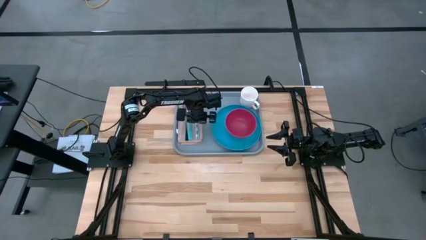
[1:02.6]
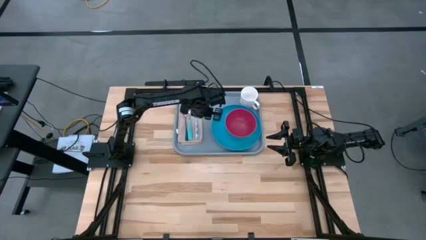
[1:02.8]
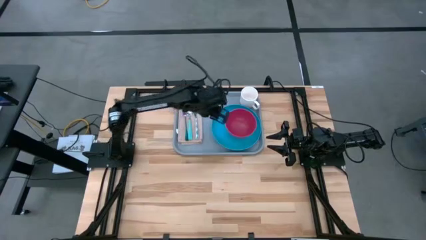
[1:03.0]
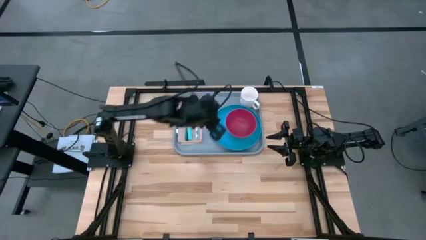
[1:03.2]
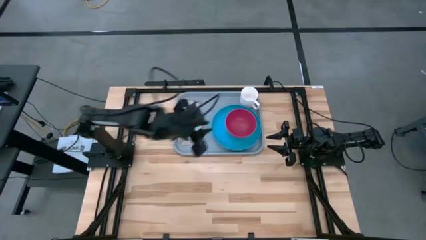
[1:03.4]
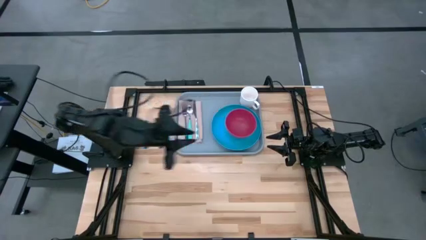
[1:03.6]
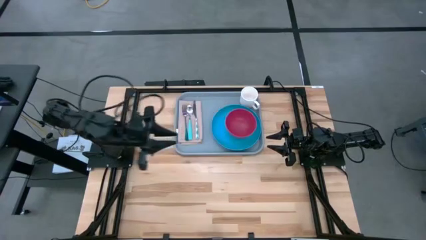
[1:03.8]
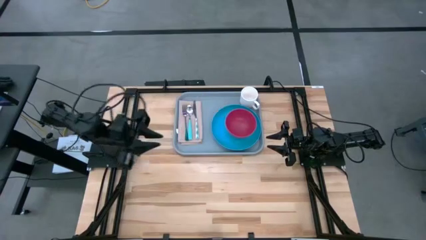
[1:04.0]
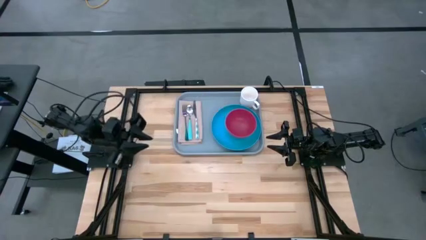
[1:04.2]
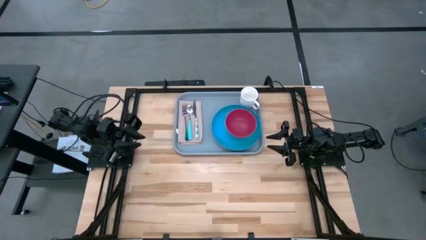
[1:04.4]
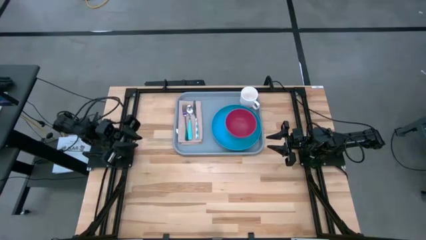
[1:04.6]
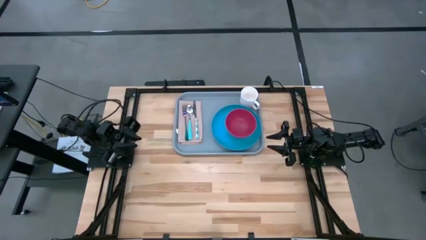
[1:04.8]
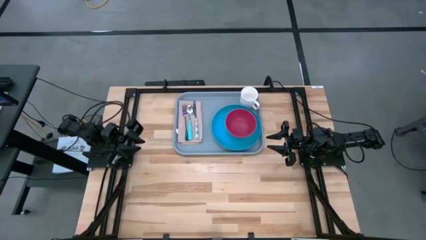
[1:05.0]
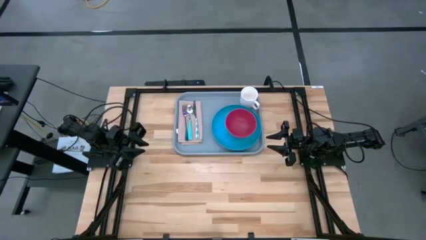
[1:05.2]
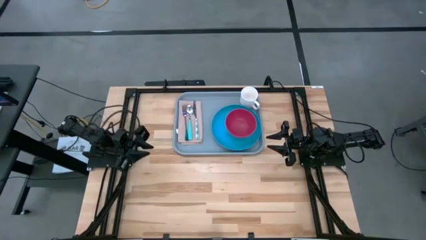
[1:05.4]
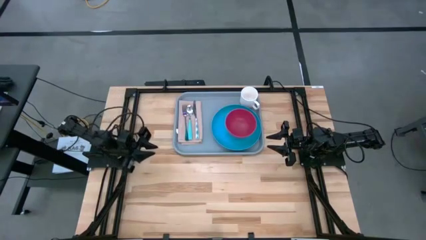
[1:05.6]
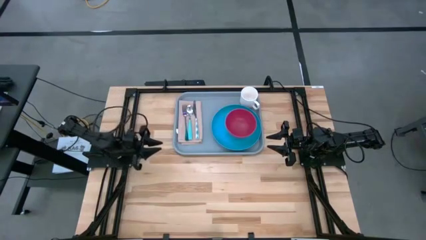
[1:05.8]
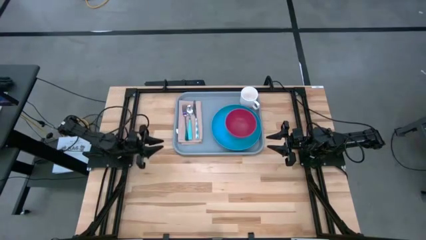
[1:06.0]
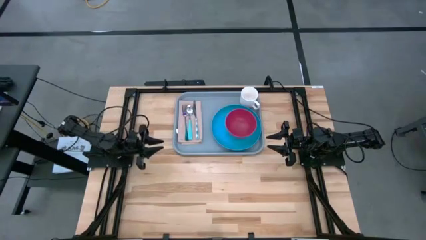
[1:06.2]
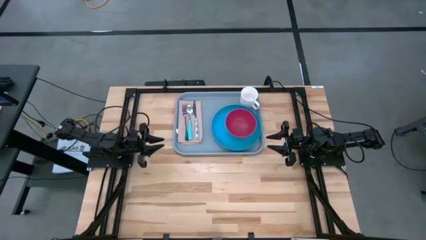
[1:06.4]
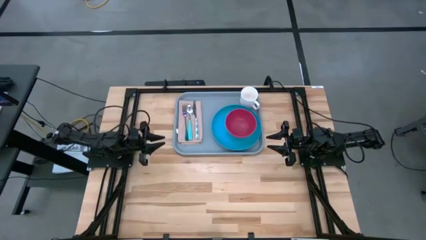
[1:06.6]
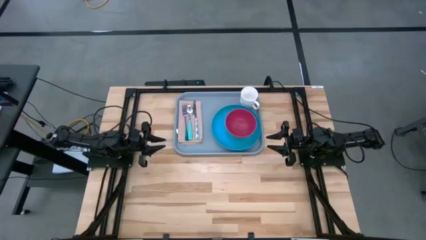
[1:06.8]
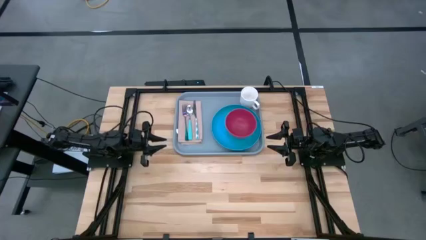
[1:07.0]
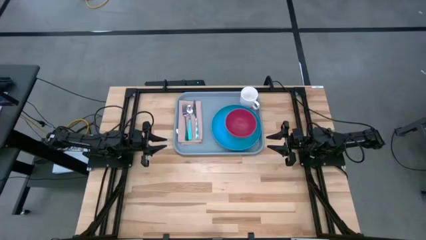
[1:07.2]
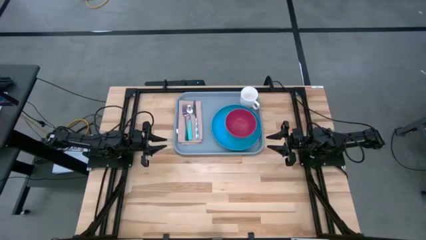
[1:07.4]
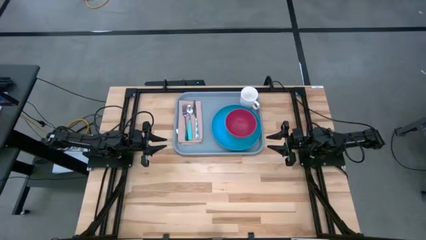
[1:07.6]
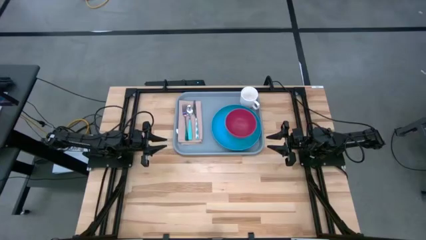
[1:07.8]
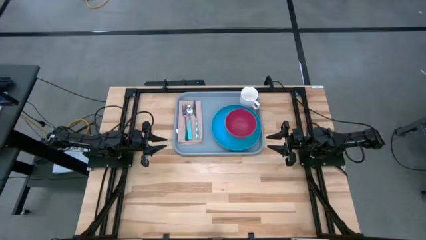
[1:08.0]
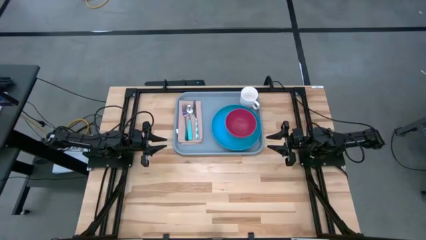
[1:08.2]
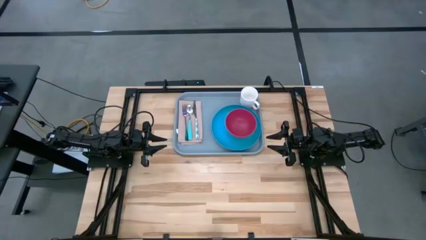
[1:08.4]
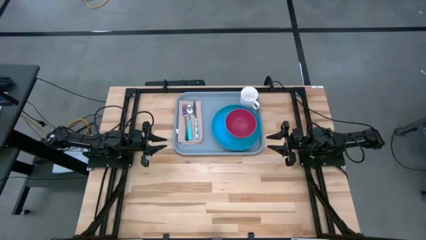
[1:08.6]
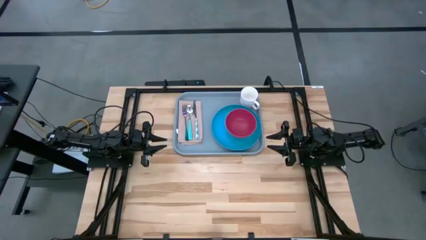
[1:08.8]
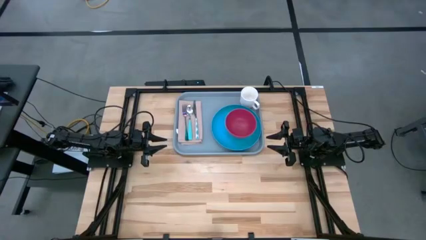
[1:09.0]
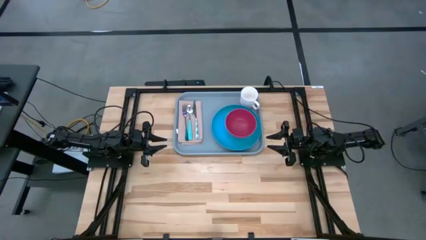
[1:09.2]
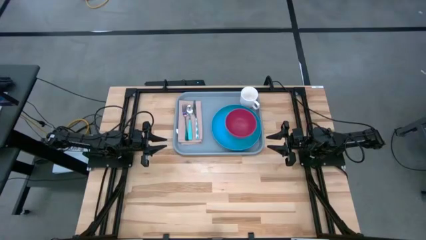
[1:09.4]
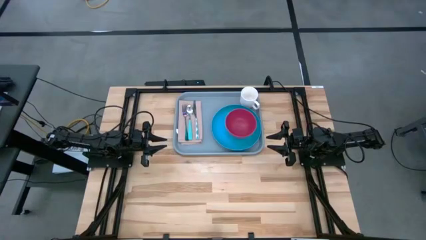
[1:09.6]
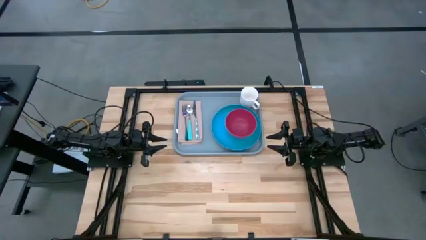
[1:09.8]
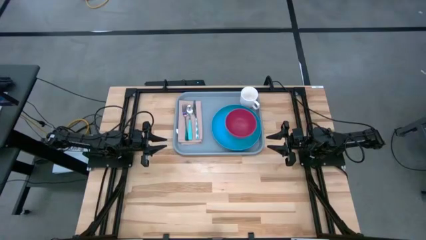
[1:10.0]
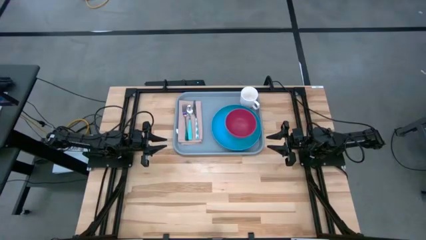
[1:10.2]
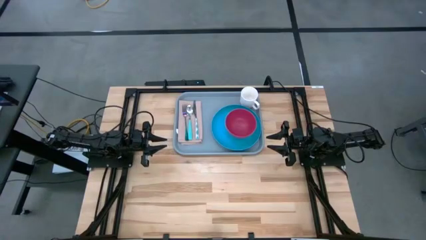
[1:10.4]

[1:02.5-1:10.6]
Task: Set up tray
Return to Home Position

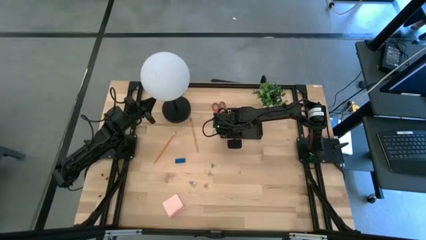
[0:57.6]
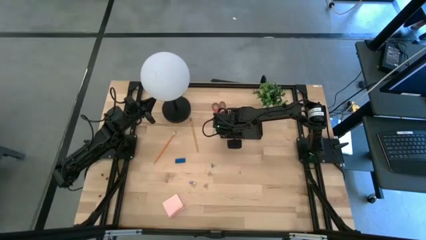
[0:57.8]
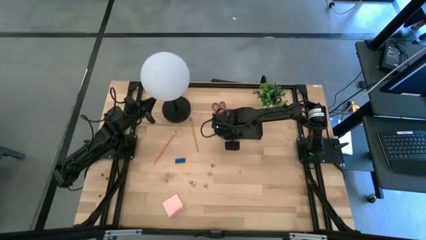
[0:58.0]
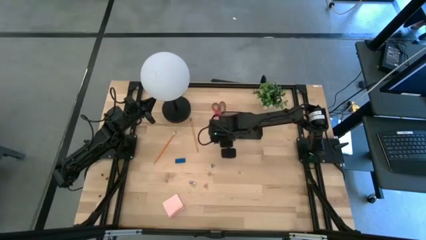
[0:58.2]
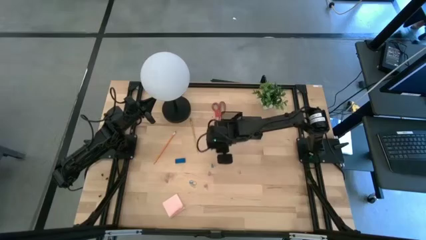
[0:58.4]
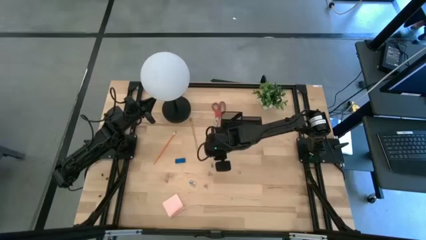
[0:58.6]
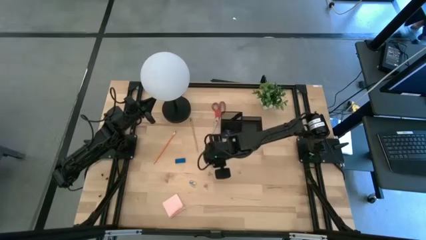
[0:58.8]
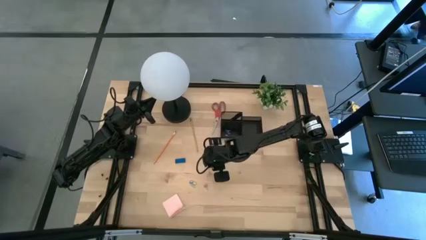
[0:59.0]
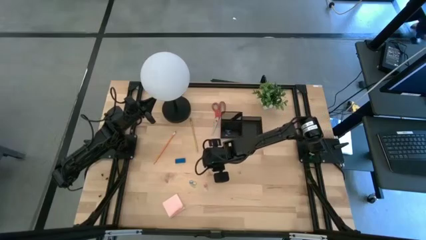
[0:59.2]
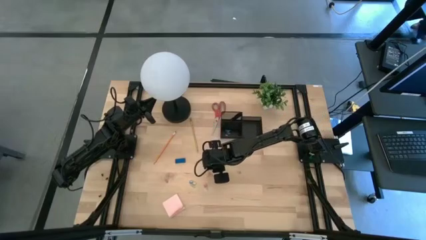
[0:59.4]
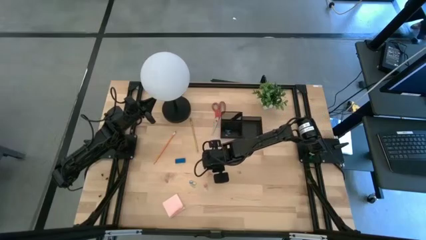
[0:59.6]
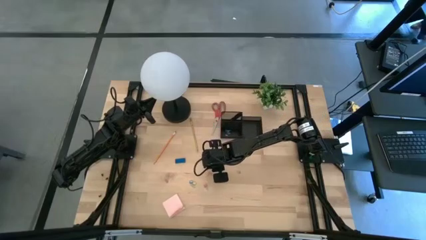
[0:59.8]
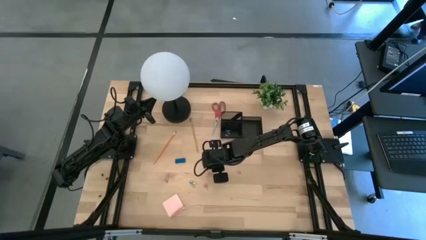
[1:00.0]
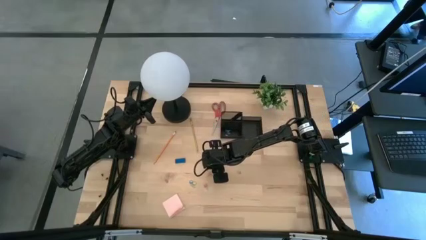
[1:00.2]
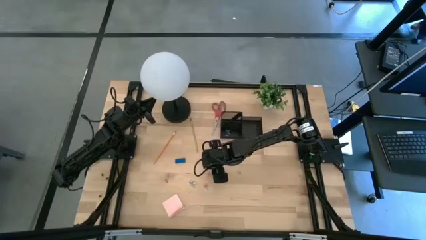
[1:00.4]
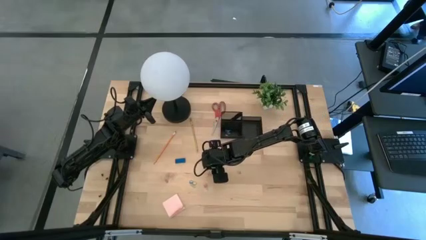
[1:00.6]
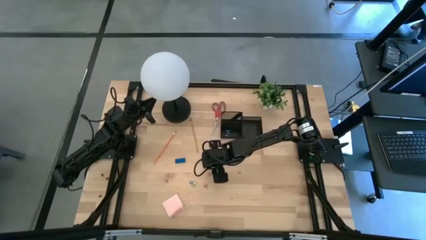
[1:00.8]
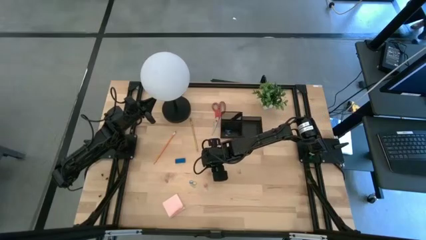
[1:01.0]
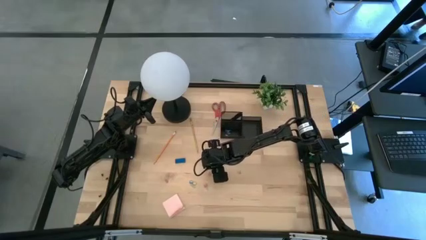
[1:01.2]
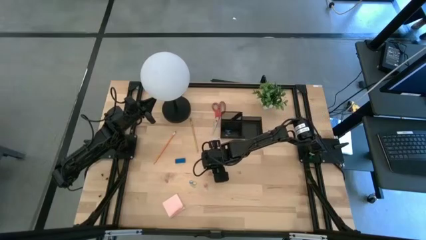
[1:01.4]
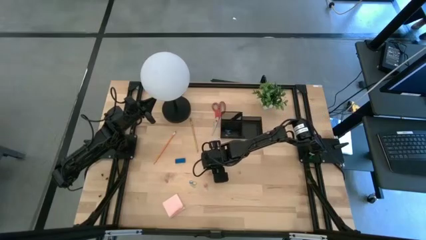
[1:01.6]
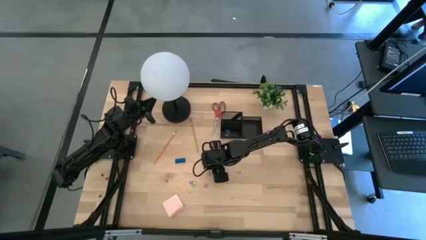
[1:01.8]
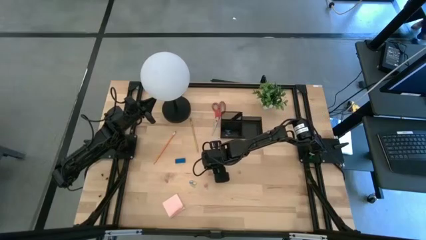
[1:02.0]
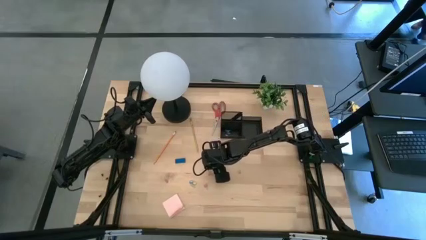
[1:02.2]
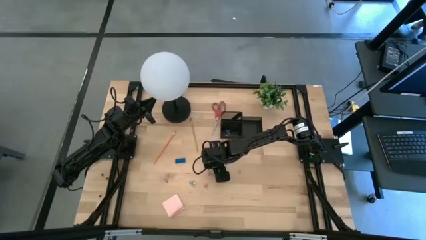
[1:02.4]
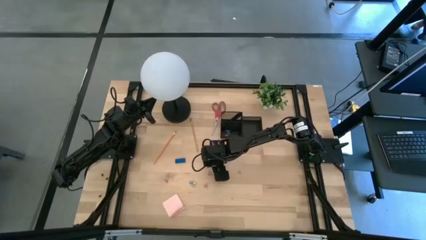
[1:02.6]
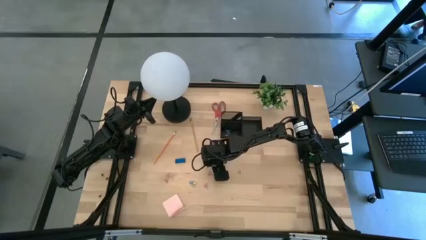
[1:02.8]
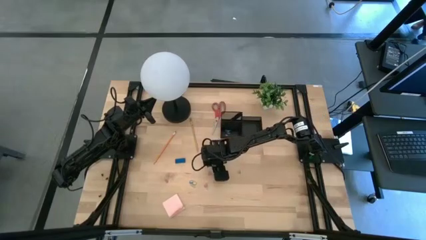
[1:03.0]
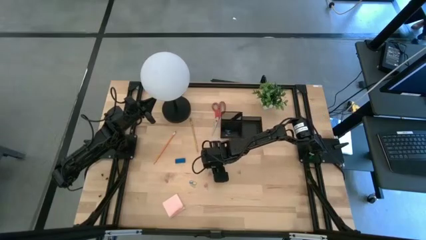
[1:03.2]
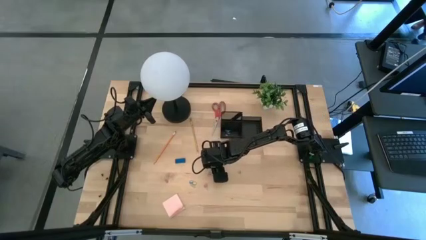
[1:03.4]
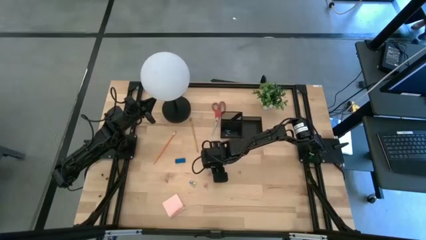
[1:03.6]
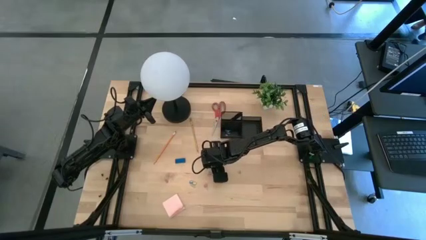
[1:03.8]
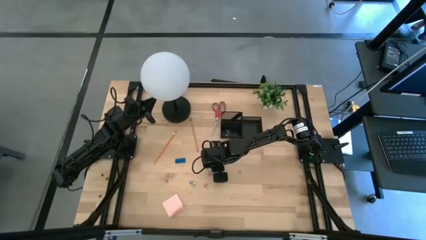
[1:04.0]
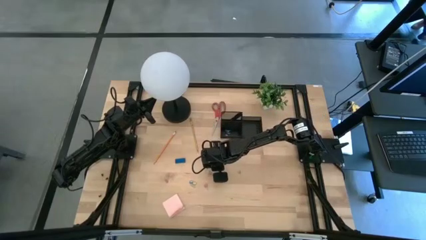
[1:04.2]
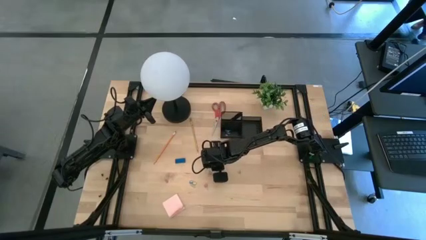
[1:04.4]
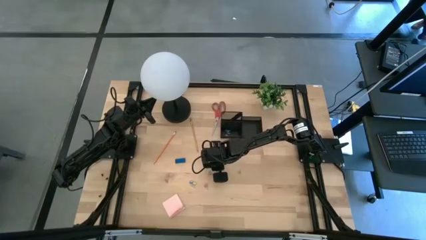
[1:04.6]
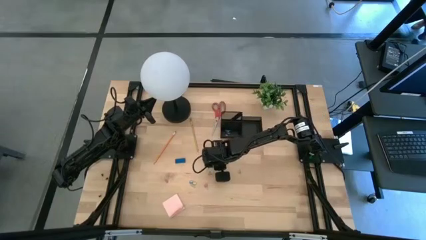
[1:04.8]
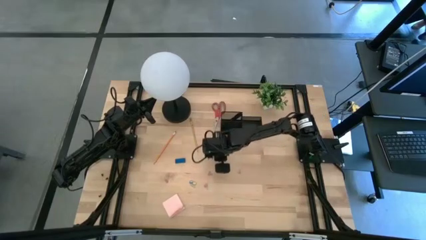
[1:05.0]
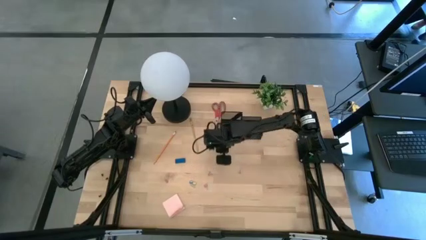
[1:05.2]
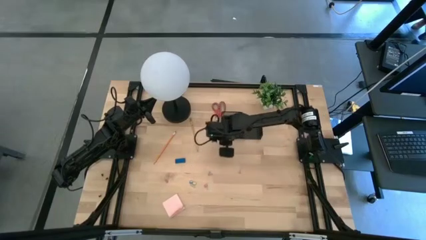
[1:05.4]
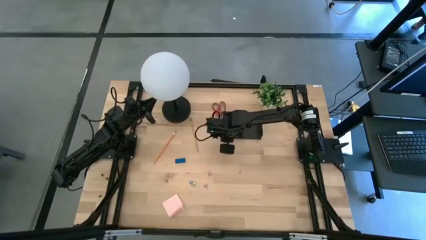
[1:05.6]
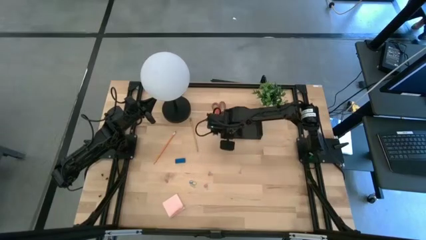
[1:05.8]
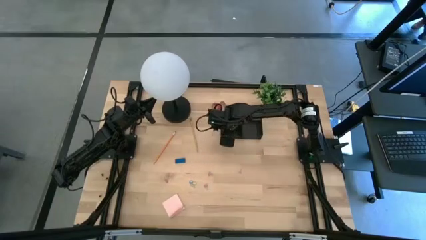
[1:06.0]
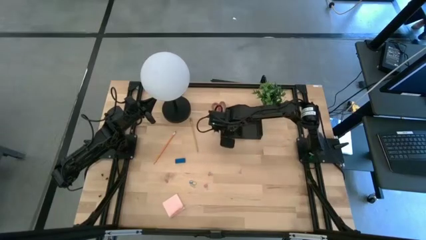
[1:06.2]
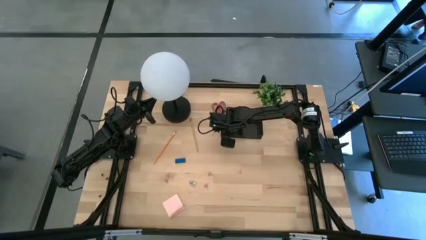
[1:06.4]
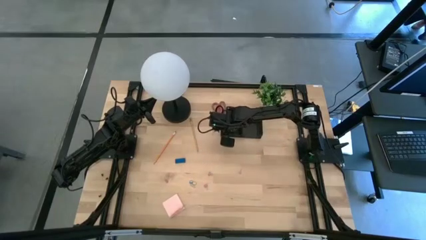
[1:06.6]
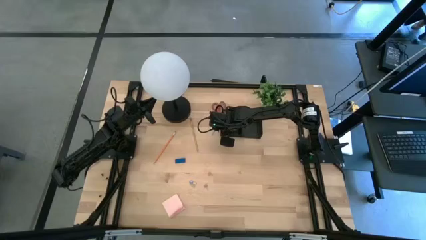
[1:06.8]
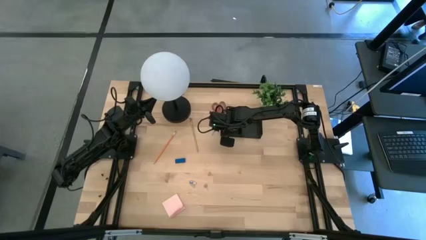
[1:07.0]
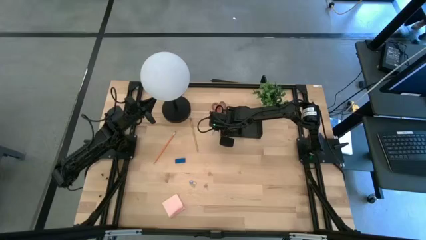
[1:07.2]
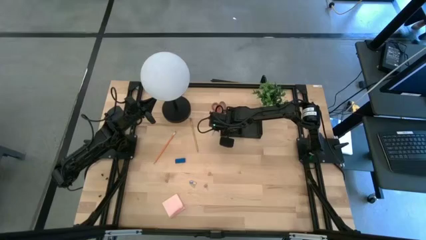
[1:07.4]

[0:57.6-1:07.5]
Task: Pick and place office supplies into organizer
Put the top blue clip binder into the black desk organizer
